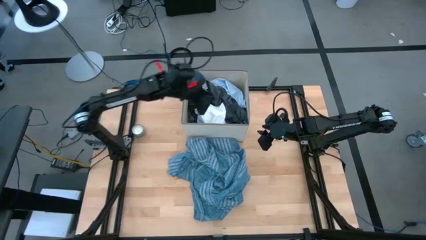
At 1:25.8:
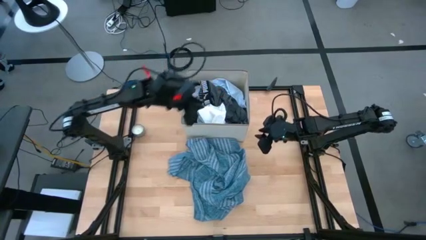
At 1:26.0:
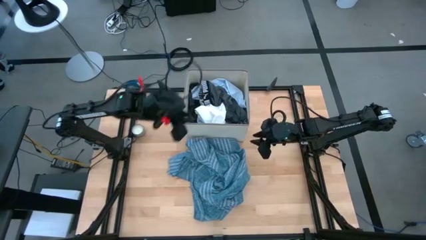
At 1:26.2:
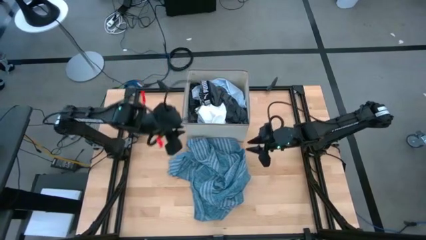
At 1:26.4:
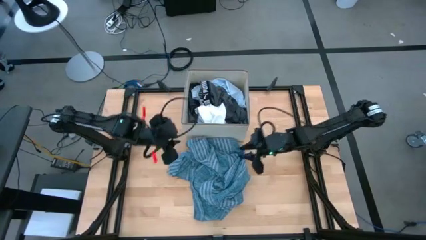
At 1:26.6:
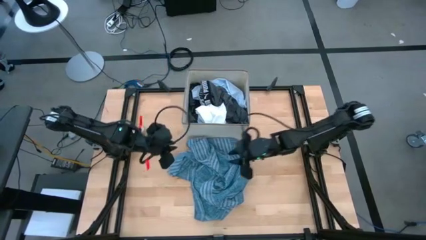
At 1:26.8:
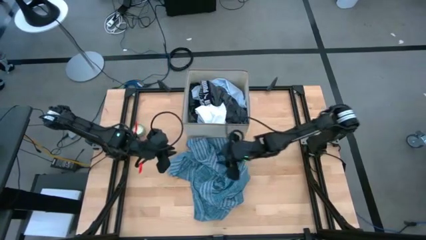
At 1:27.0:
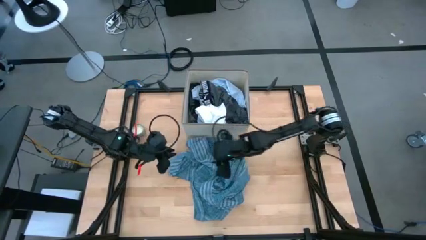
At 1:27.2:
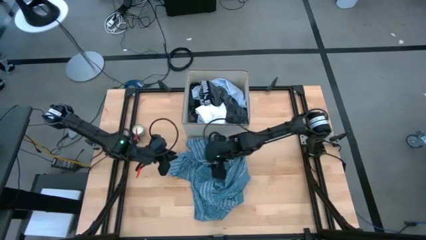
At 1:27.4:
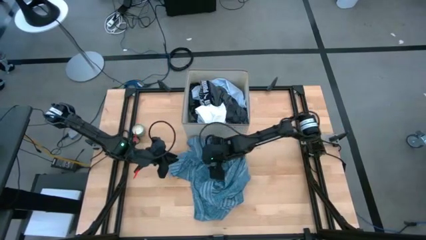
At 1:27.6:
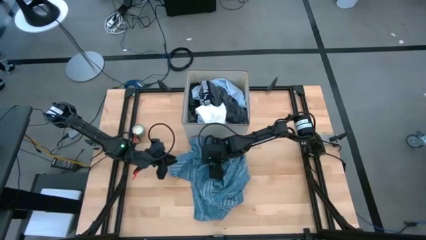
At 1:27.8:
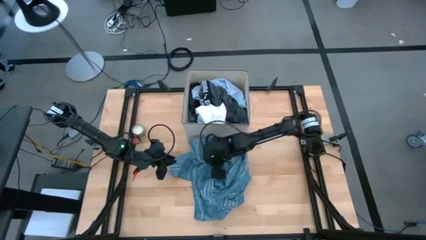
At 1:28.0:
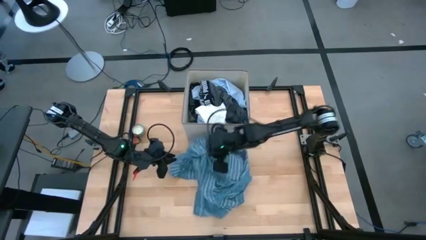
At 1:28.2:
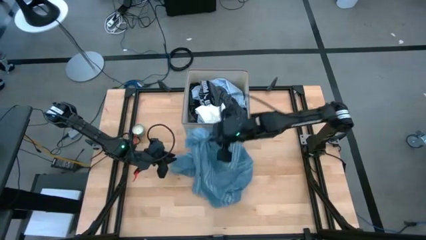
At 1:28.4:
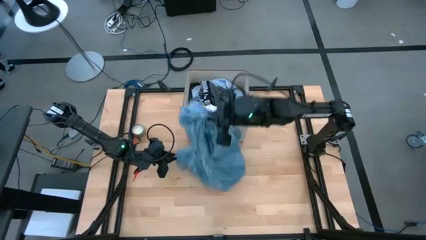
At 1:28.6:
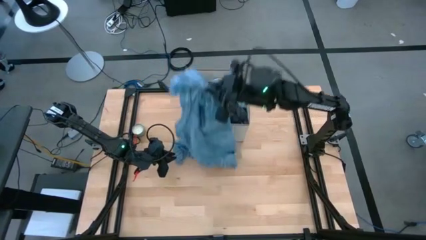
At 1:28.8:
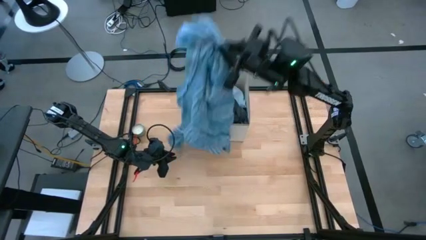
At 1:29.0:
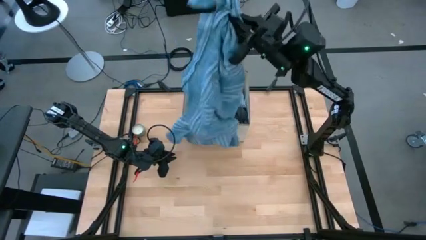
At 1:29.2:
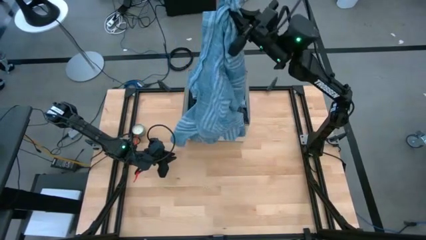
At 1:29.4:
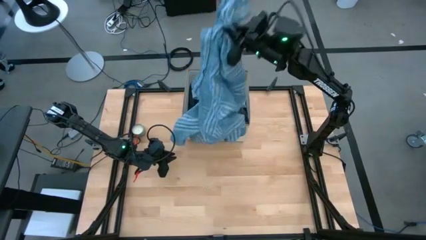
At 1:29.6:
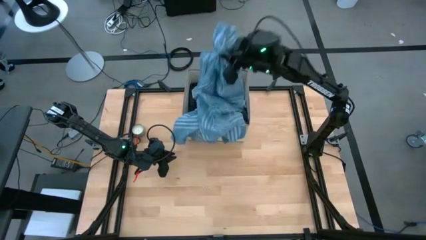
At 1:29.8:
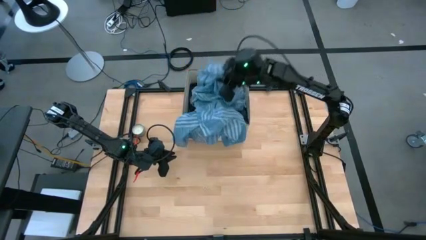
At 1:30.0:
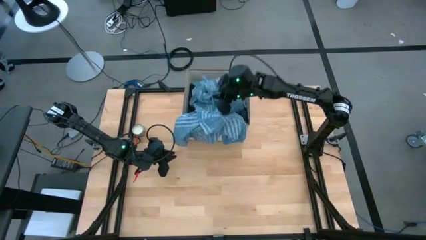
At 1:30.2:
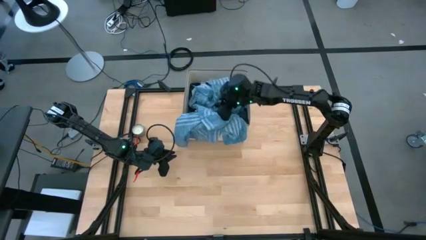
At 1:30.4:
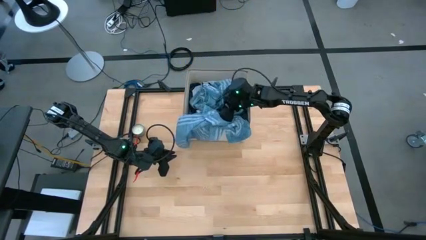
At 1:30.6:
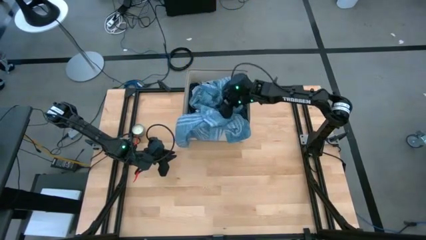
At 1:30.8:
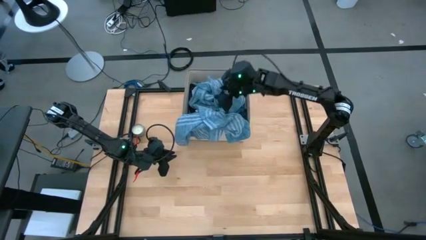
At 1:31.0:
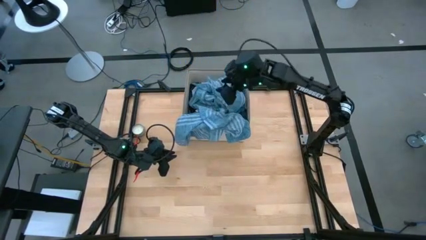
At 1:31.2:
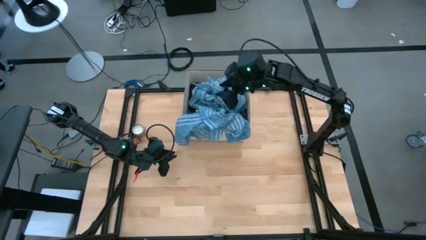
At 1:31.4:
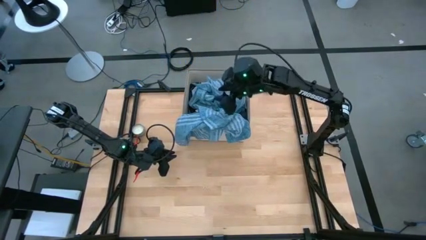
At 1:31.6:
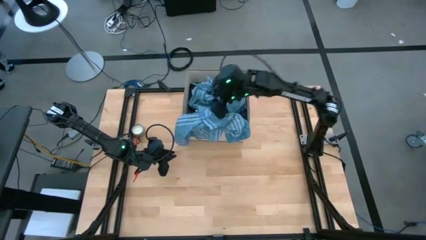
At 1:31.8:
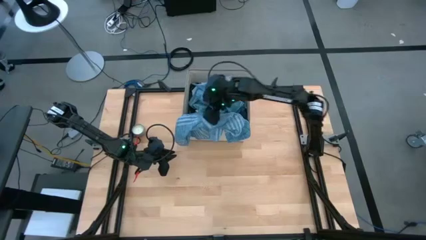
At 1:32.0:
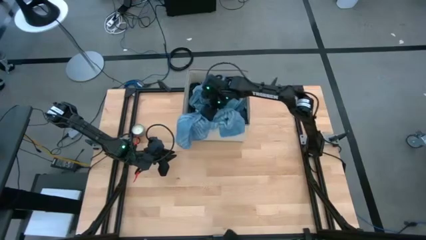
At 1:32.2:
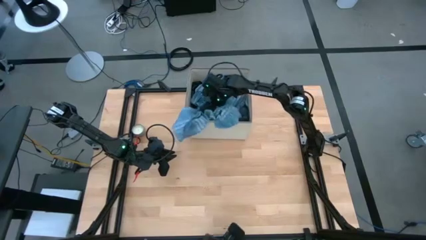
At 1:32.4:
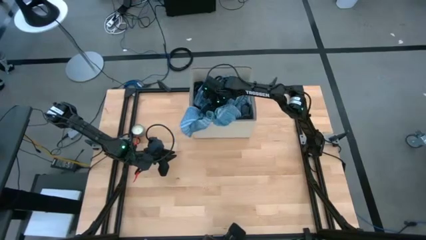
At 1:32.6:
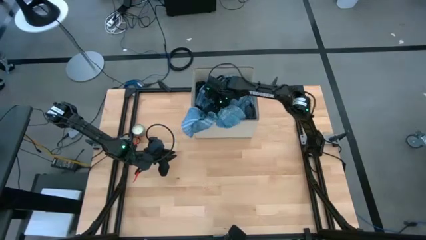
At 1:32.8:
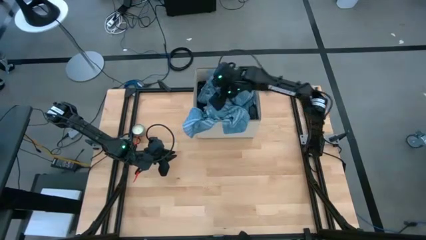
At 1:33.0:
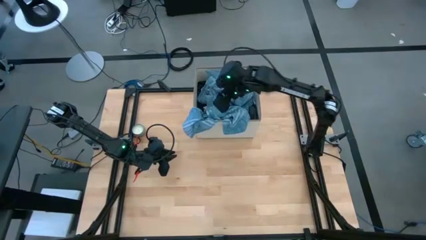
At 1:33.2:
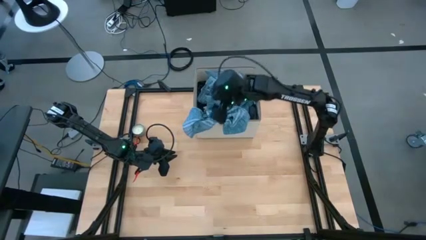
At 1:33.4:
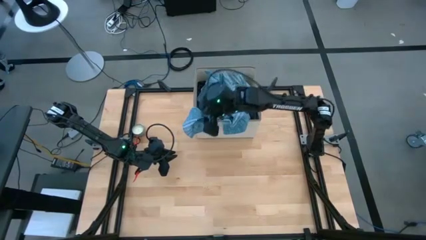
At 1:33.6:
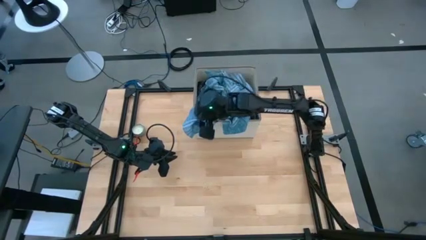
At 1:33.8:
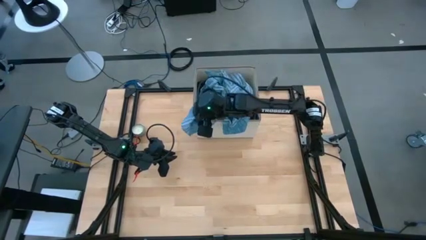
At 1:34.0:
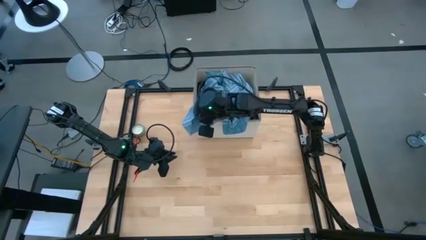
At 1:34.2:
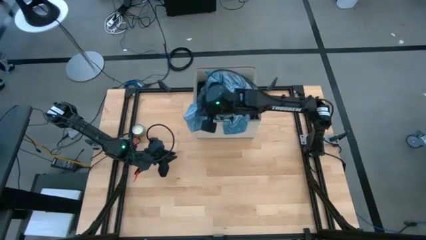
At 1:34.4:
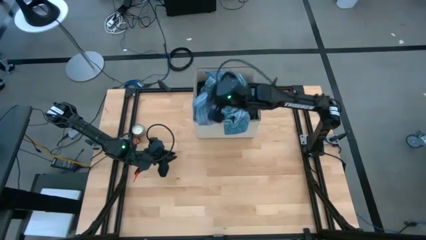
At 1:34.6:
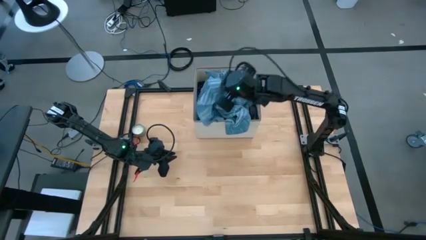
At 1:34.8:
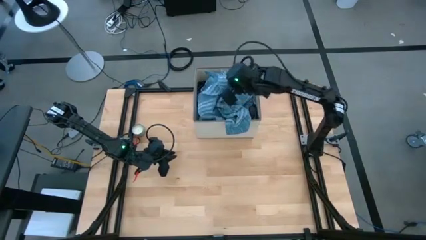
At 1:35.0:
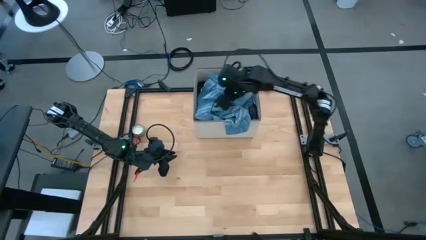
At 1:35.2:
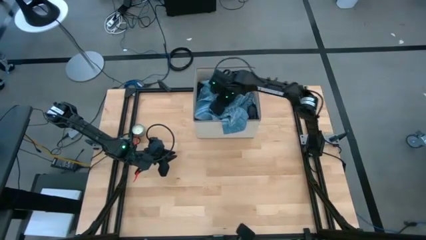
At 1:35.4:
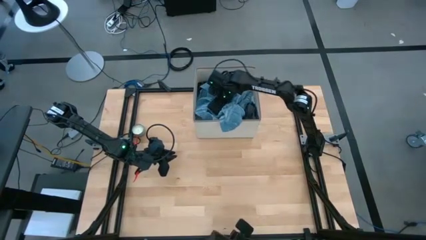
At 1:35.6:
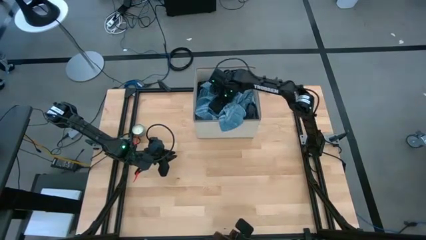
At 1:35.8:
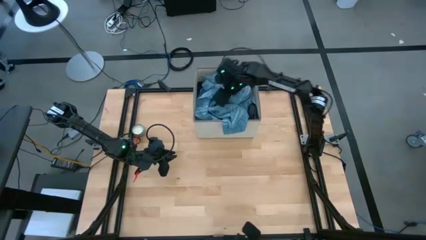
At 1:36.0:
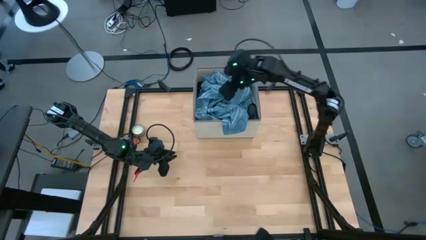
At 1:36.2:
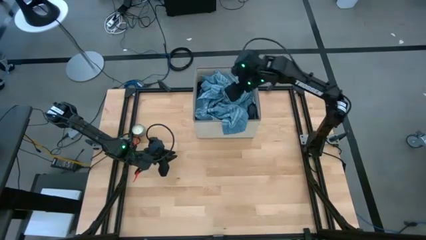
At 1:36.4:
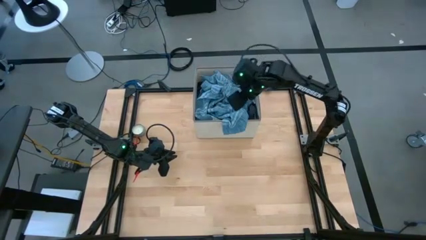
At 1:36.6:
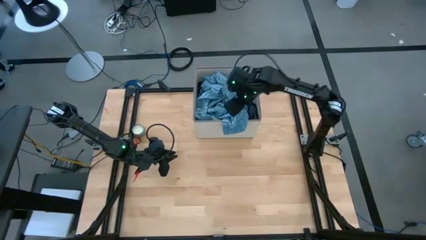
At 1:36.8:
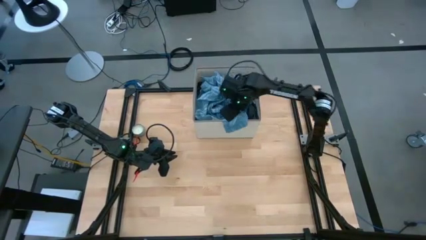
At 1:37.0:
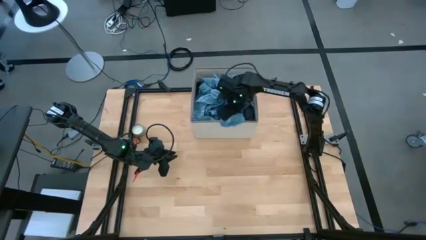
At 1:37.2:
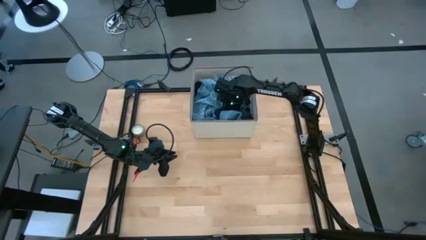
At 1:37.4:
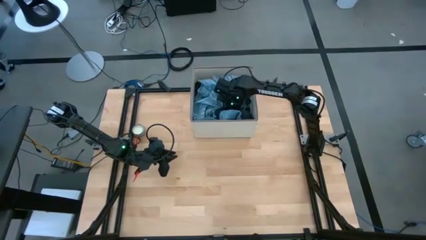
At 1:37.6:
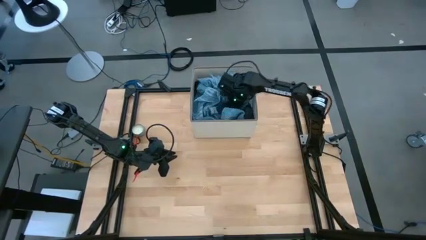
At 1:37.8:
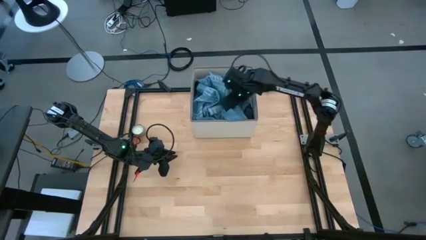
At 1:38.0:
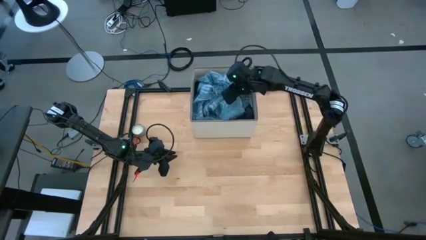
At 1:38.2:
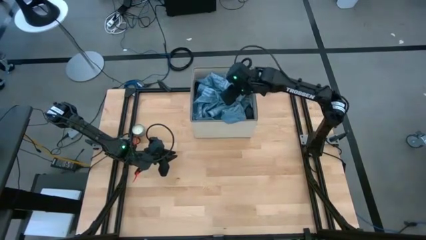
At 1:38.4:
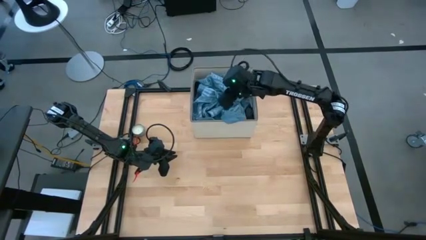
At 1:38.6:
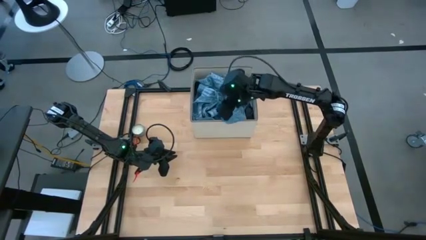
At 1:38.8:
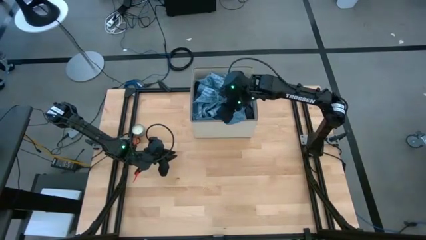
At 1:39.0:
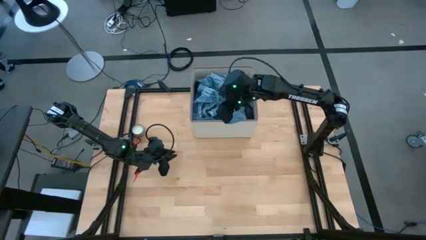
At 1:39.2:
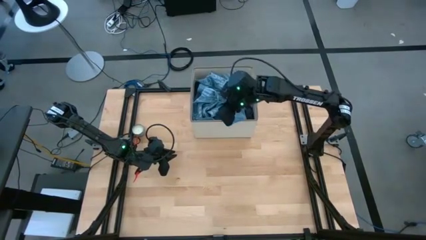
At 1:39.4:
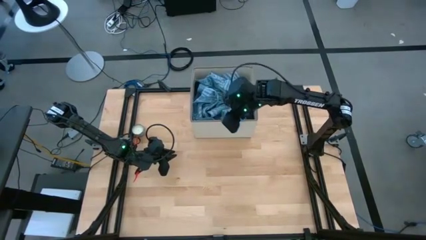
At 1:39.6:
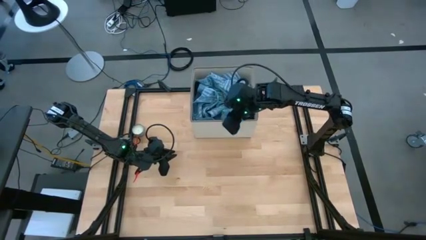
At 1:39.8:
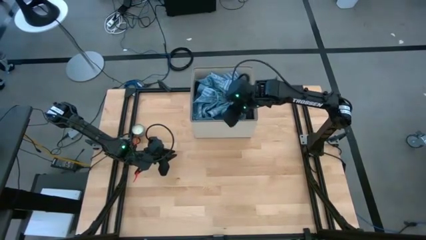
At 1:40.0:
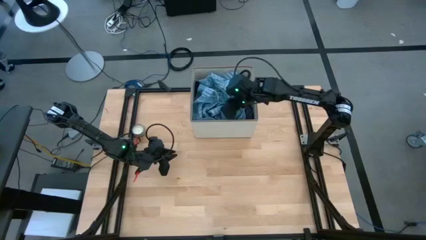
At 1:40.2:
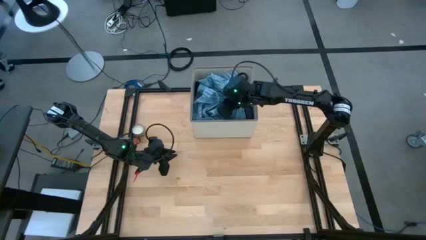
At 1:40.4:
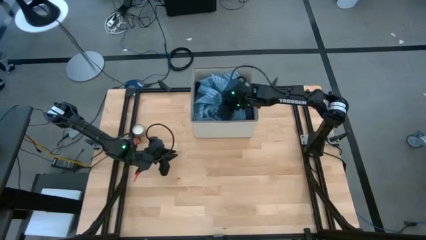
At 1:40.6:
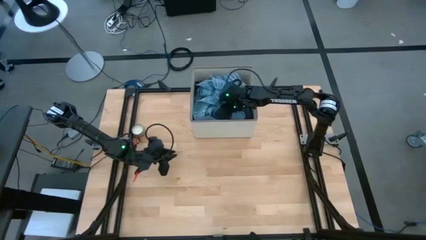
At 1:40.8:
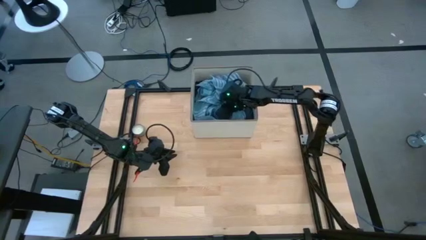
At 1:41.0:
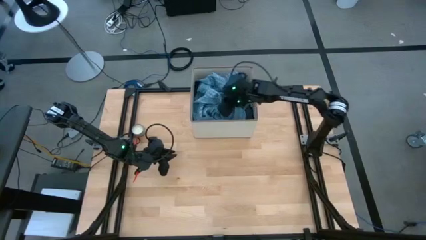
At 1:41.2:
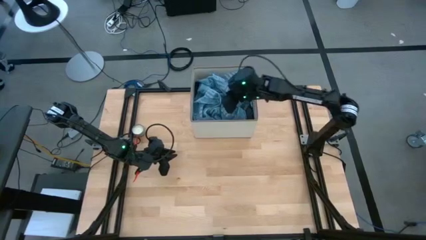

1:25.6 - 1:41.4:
Task: Sort clothes
Put the blue patterned cloth into the laundry bin

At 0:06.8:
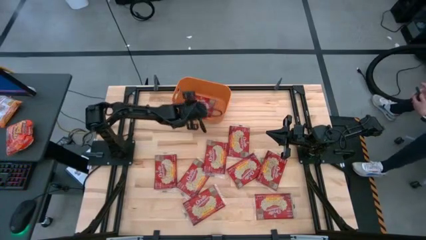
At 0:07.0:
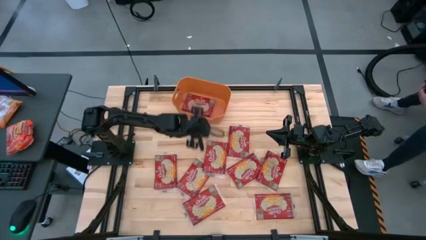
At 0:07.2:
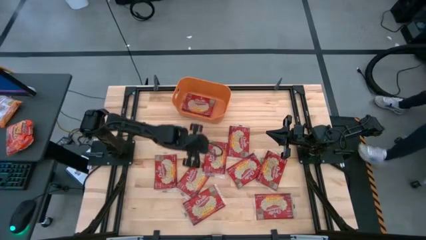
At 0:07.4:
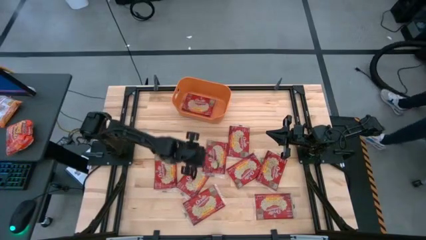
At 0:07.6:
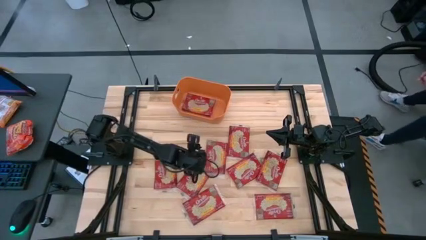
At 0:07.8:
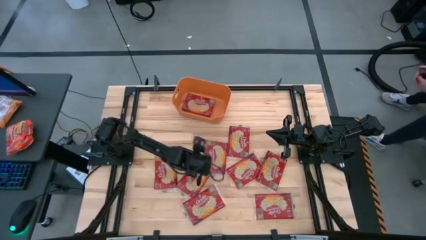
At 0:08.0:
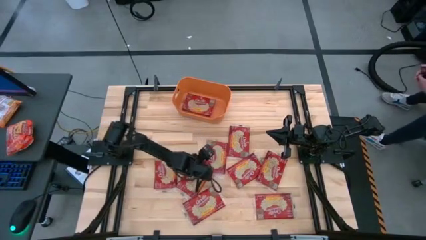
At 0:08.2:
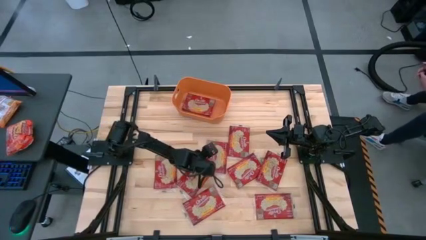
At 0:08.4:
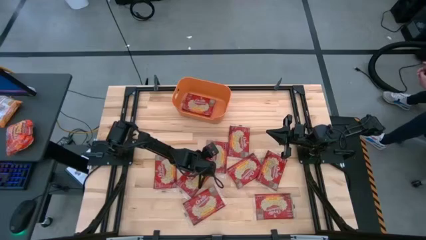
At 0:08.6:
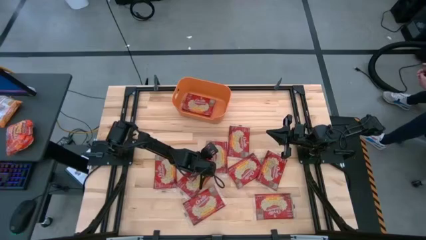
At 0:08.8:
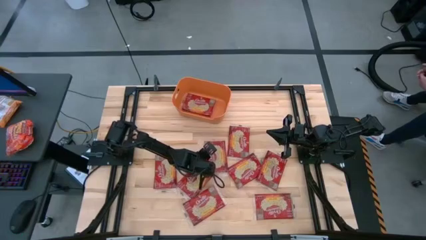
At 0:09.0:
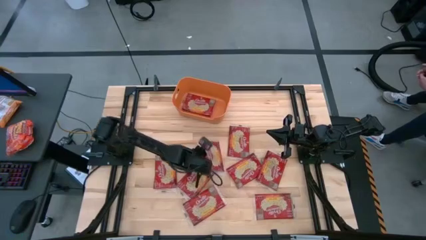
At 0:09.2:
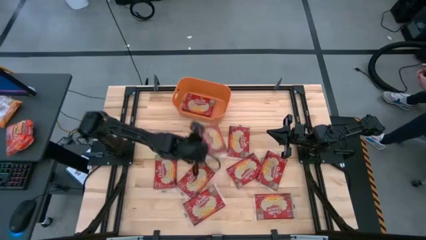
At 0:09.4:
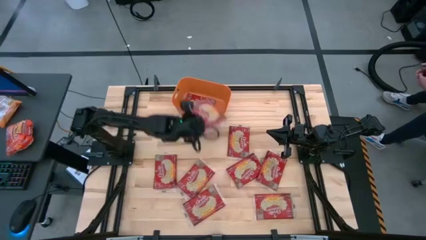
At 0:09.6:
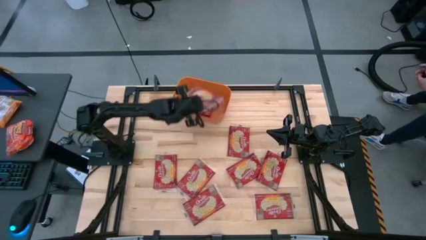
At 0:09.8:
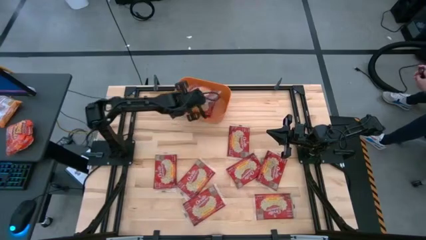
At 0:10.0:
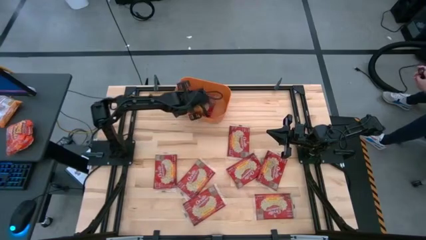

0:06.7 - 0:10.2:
Task: Sort popcorn bags into baskets
Put the red popcorn bag into the orange bin
